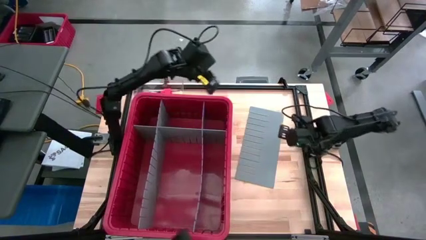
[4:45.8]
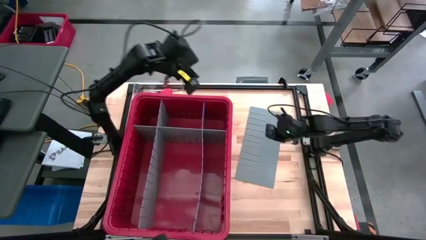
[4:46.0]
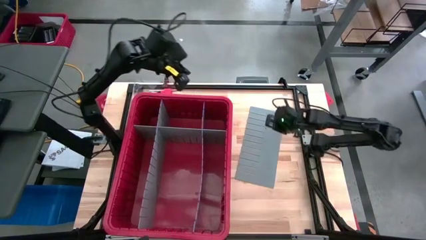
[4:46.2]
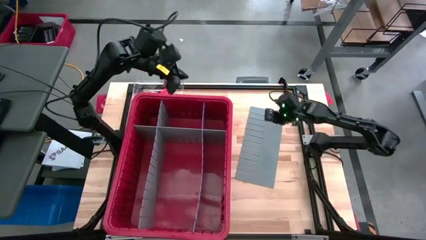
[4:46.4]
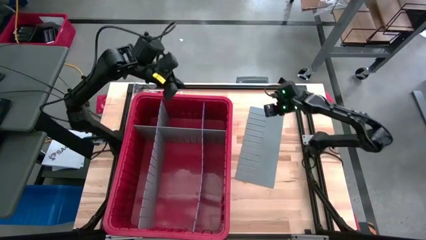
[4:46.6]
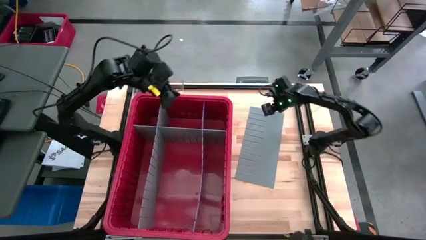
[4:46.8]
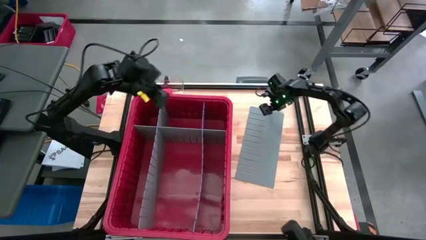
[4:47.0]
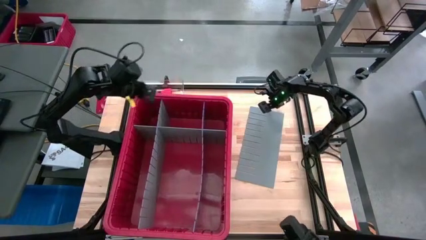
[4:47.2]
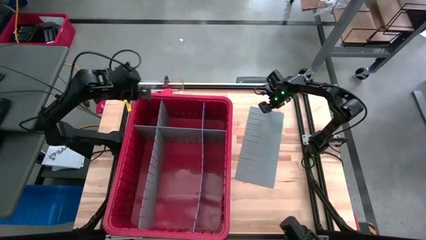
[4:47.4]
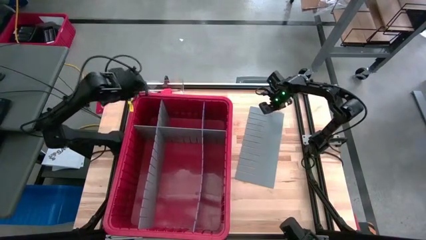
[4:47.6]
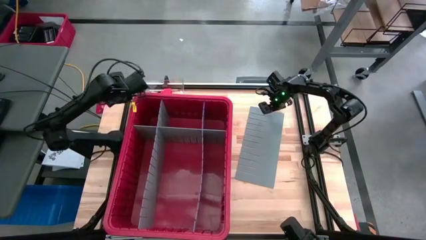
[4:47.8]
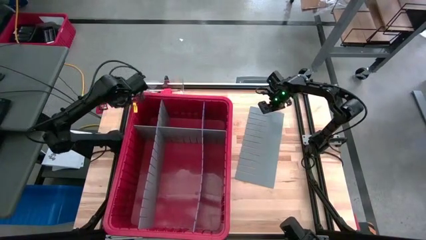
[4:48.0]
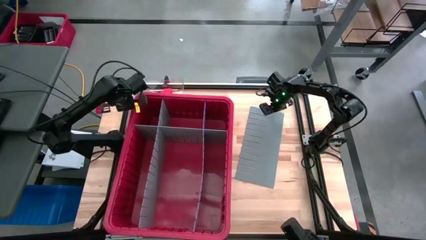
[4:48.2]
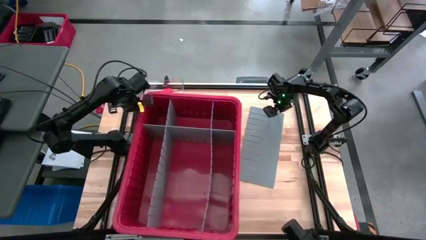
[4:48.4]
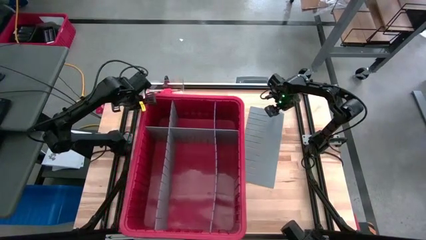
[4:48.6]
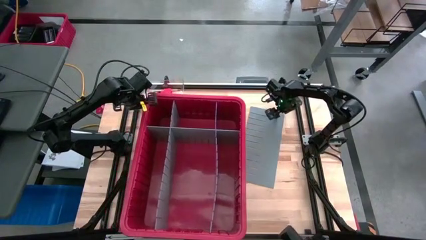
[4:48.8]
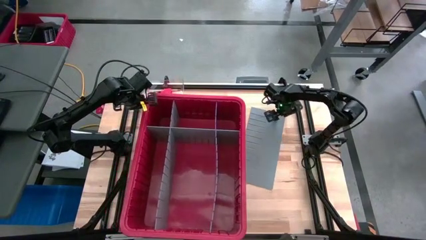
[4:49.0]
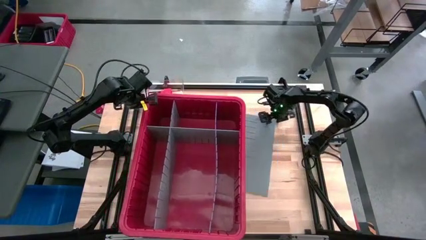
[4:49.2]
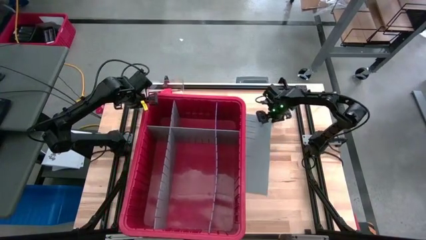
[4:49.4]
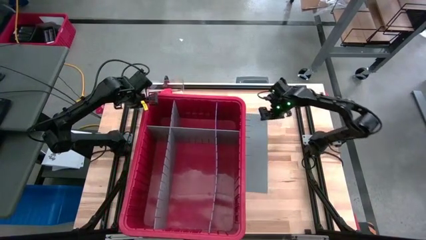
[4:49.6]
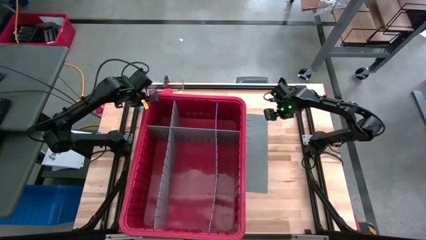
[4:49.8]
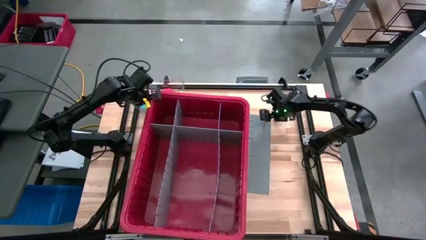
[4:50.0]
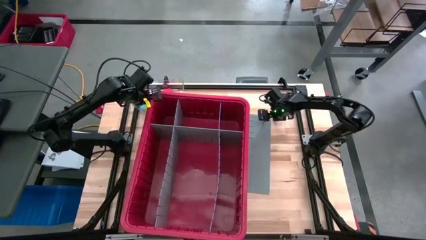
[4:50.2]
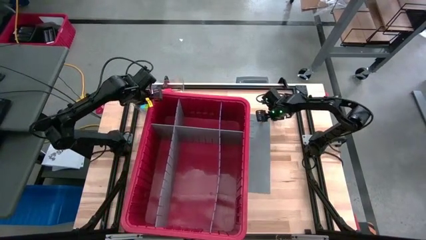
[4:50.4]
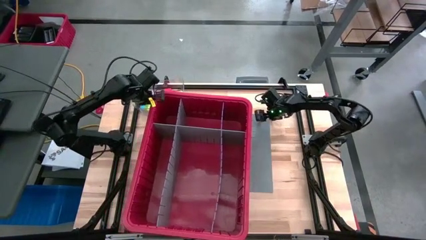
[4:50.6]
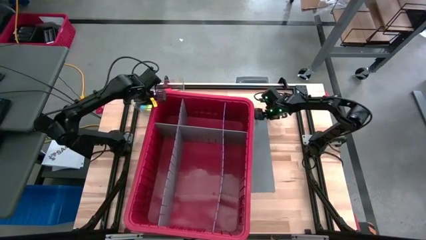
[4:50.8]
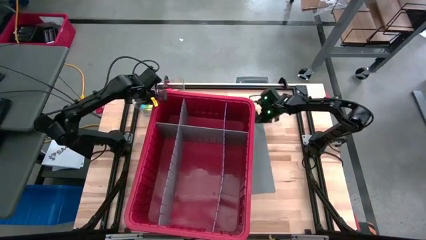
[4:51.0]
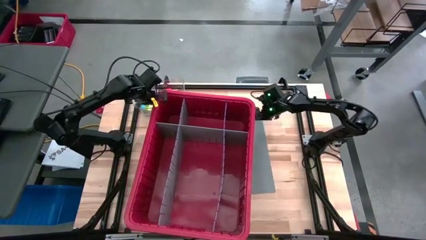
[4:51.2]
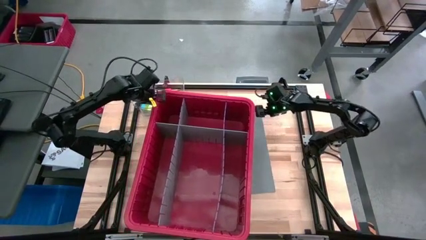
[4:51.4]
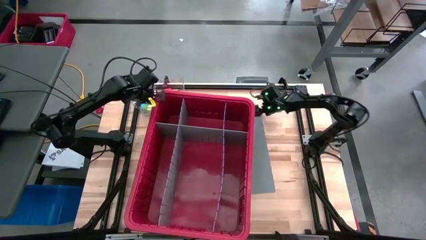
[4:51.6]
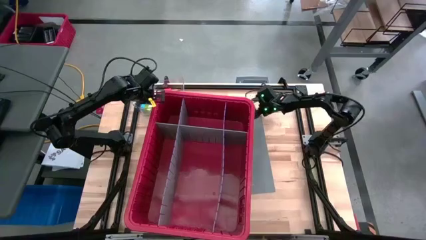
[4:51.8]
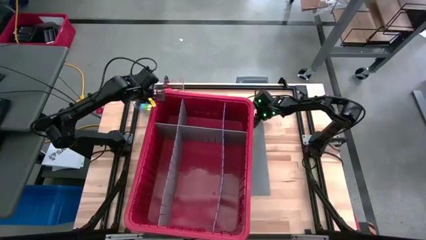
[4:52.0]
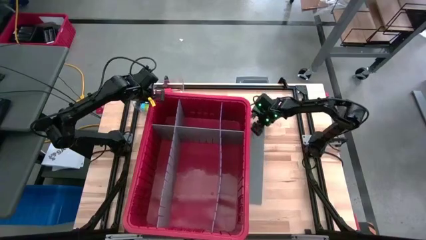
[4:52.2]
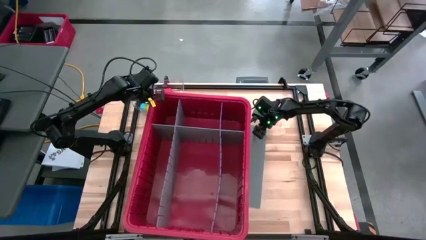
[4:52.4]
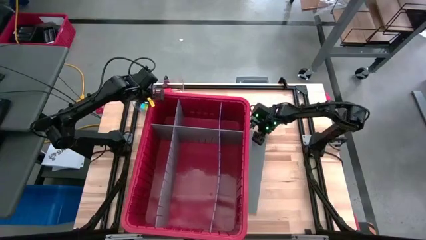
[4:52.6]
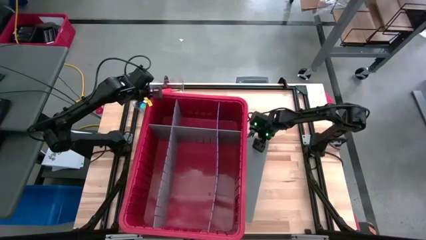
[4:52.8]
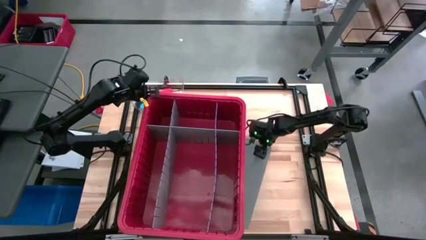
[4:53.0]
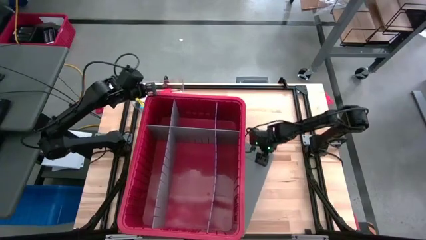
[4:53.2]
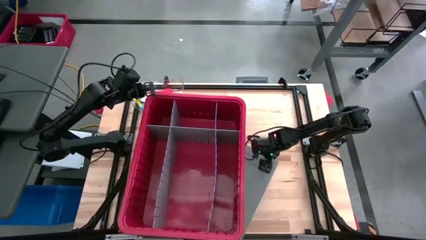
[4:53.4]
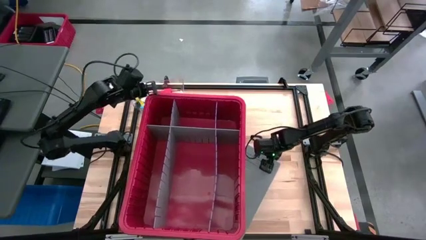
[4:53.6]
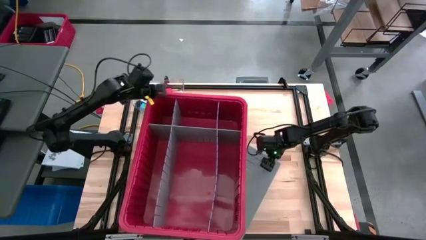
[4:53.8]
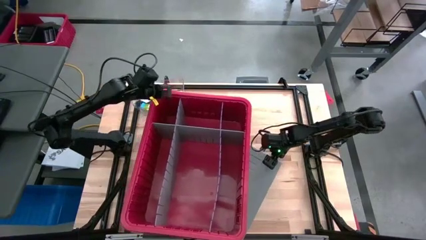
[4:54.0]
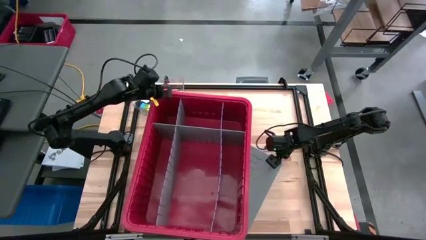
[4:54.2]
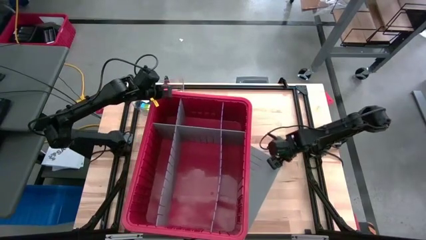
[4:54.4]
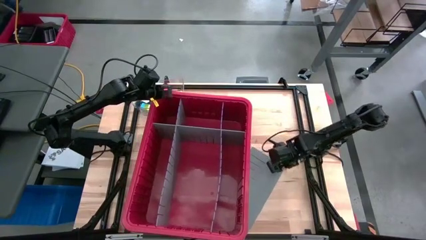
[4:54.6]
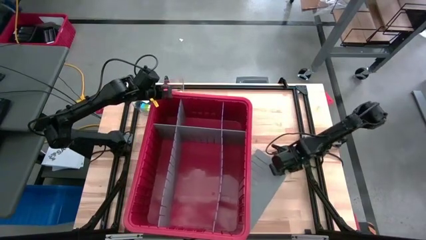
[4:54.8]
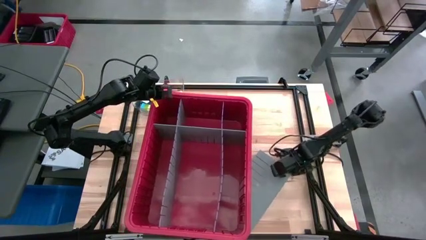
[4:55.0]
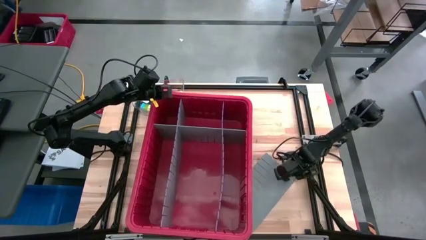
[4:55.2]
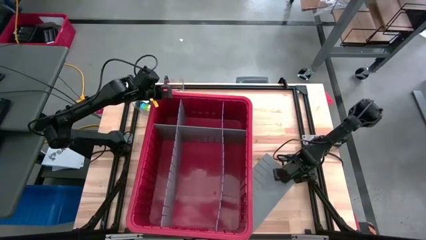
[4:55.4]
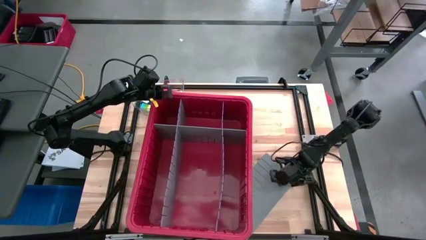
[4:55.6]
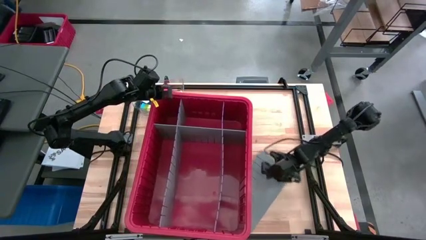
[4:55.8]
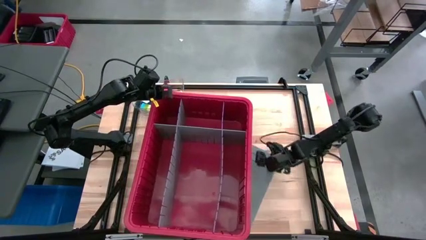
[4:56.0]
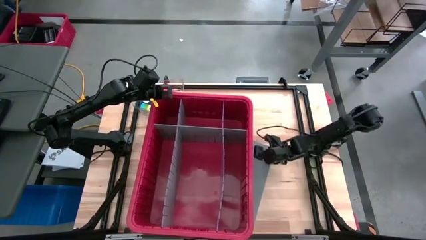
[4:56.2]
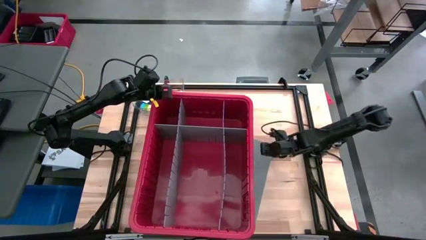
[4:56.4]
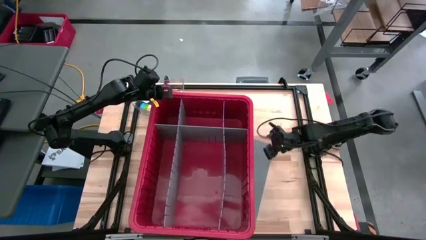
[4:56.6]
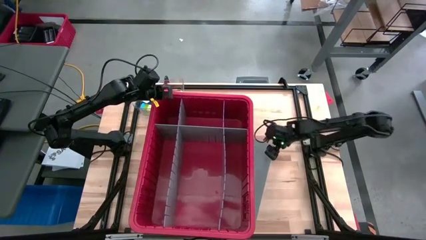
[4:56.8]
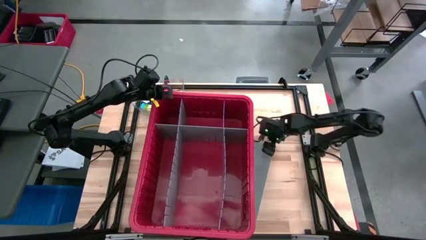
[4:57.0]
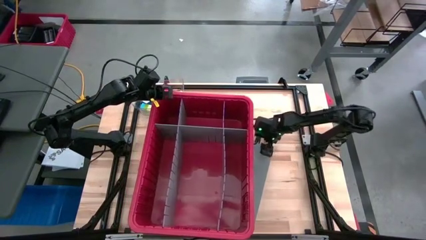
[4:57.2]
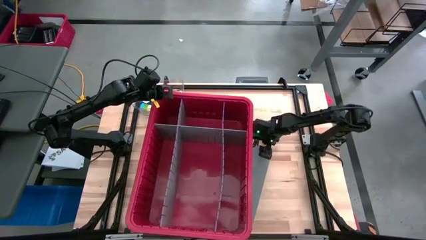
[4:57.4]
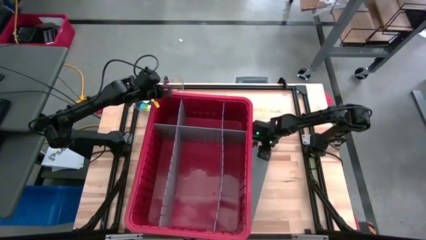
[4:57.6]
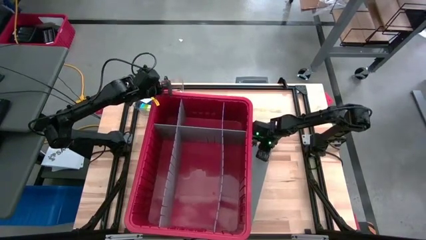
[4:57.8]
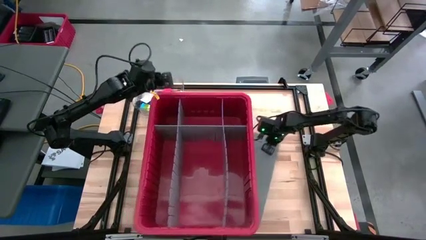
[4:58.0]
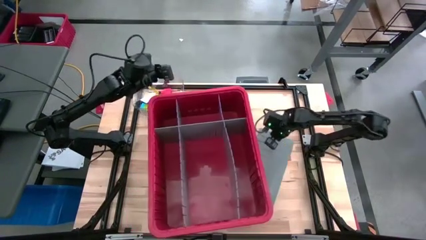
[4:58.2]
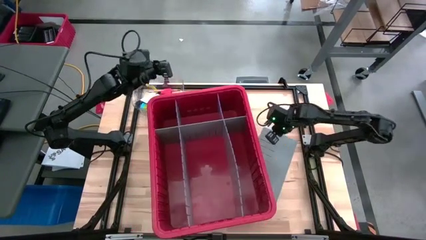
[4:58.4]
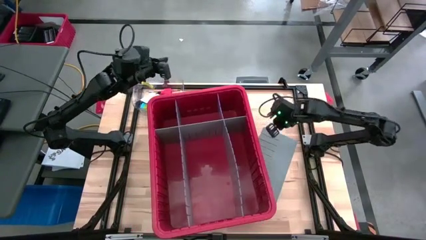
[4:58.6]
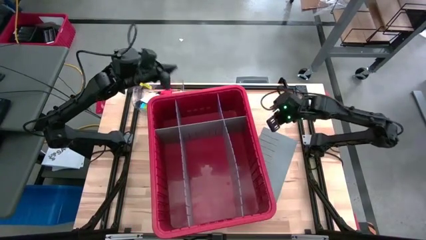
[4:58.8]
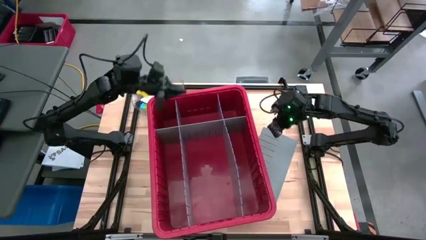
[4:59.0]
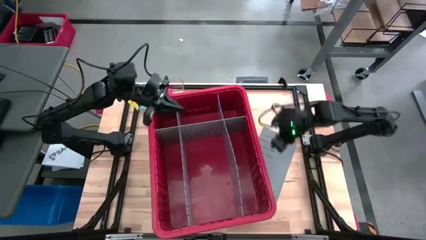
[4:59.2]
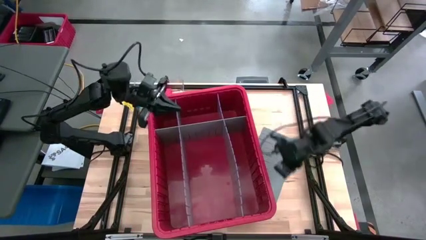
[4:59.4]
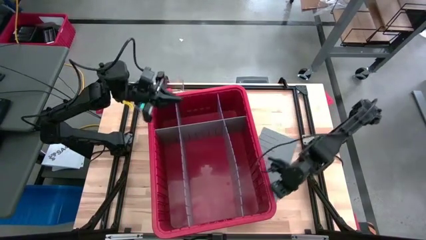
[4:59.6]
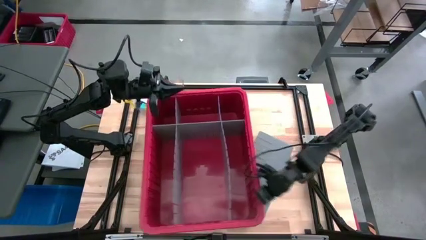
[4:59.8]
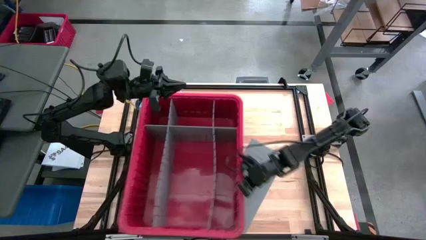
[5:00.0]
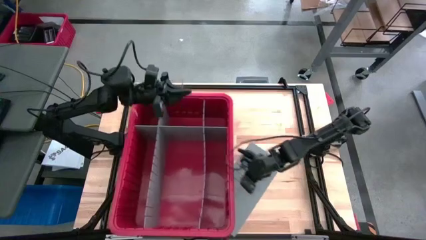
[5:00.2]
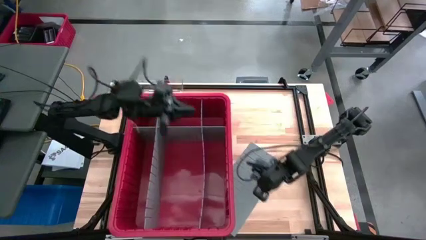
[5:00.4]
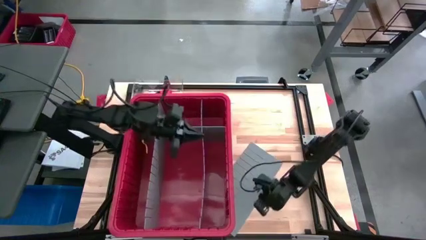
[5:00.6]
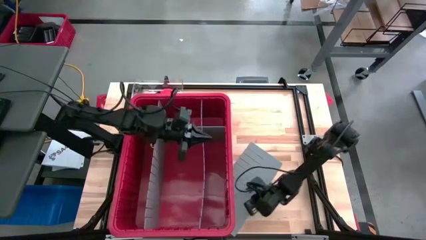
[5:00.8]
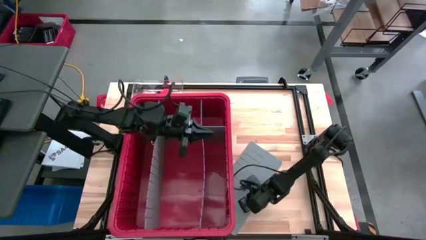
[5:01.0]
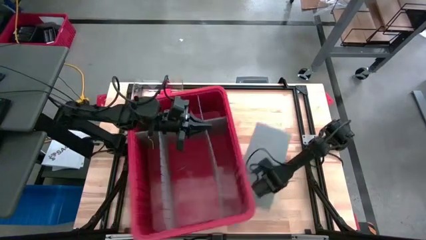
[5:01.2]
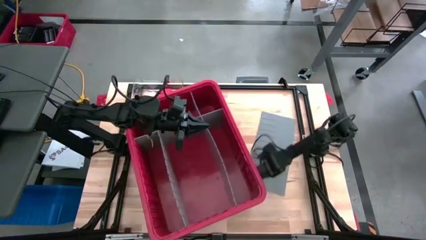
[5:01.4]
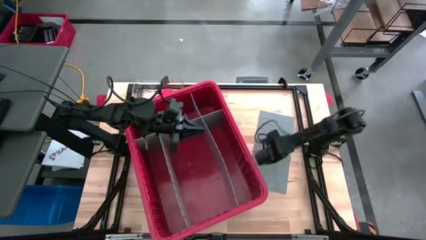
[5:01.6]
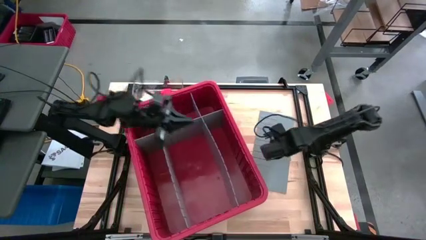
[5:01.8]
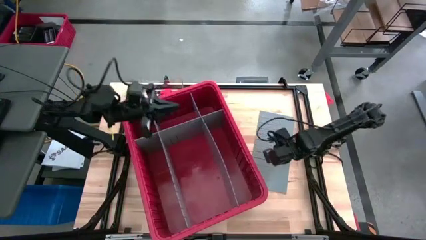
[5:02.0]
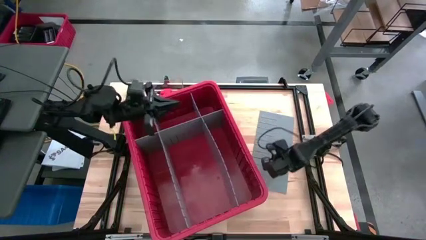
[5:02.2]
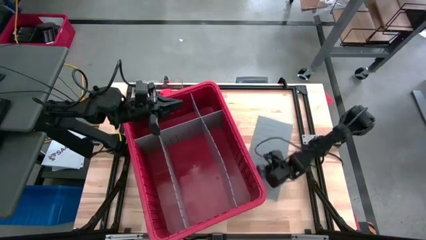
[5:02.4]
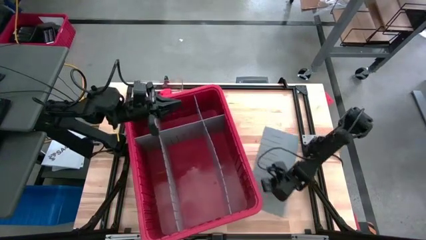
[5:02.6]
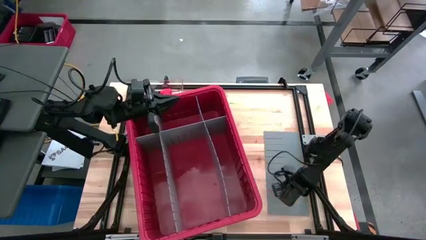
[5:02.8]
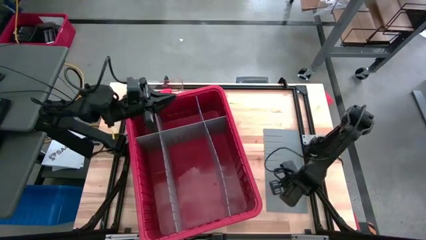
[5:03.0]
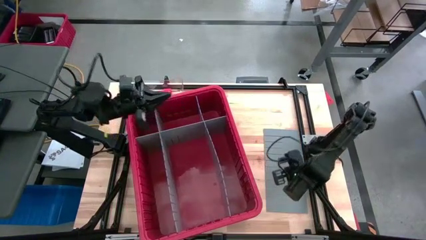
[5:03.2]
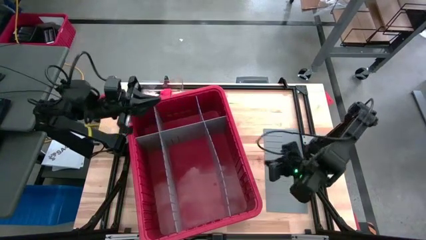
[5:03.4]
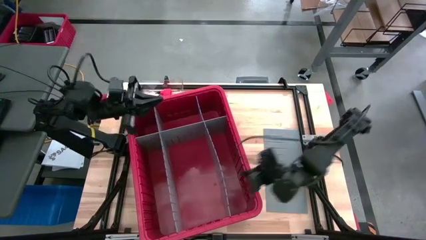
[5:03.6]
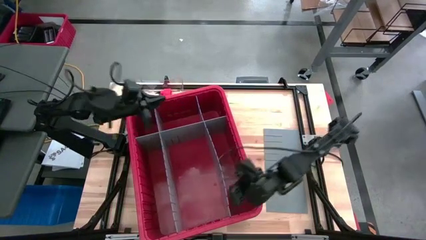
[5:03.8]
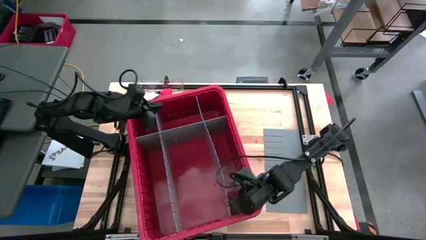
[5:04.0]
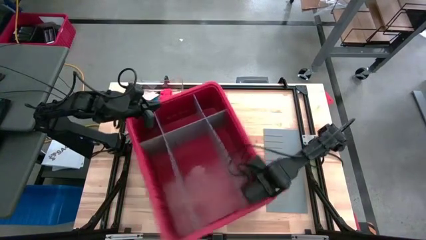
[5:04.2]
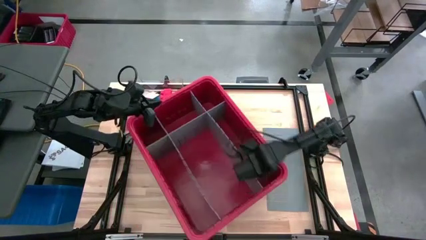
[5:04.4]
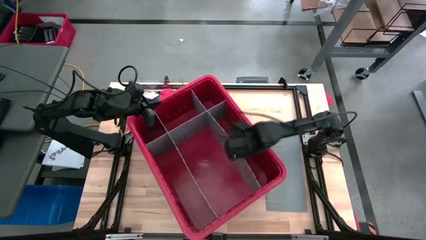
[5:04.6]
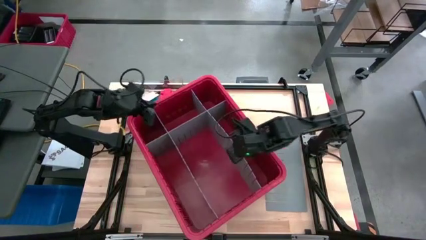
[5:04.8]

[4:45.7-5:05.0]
Task: Sort blocks
Assemble the bin divider into the red bin
